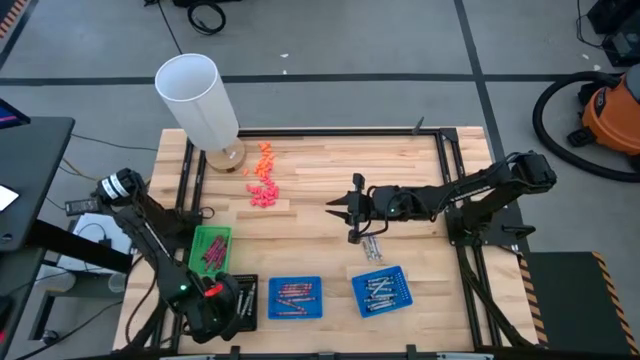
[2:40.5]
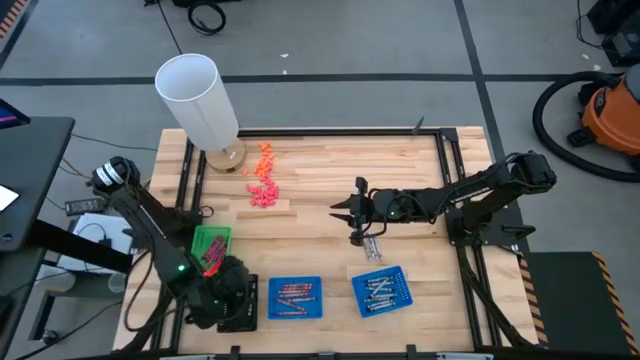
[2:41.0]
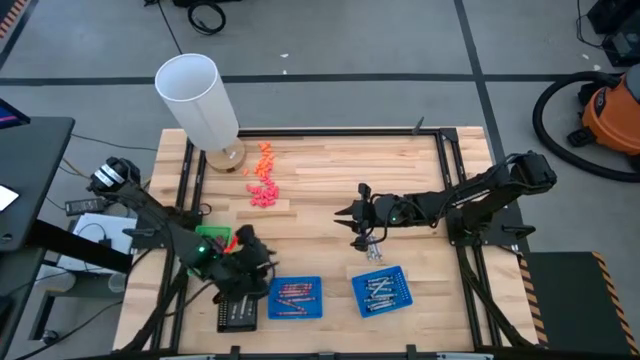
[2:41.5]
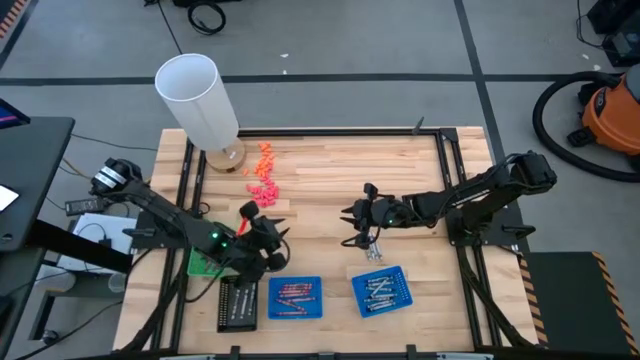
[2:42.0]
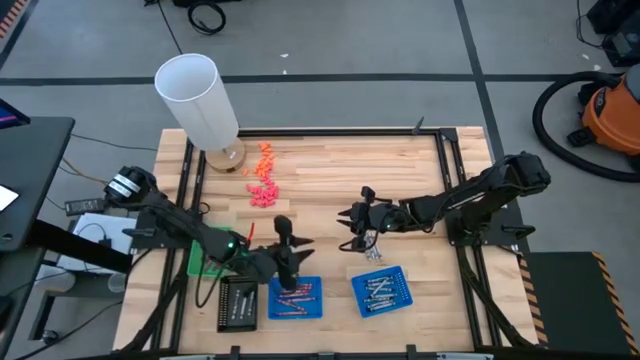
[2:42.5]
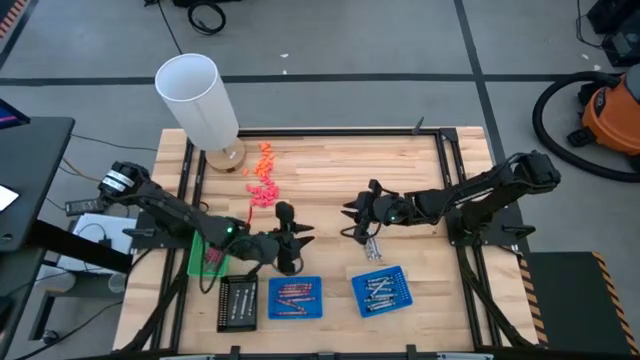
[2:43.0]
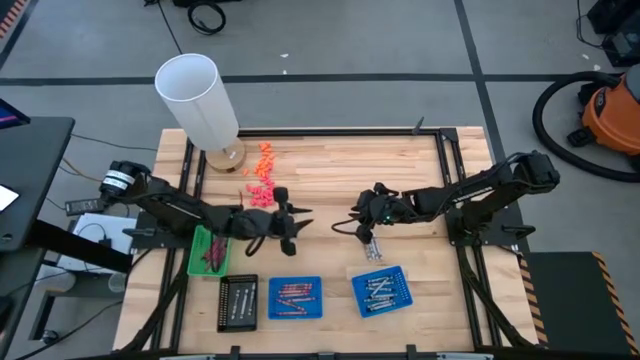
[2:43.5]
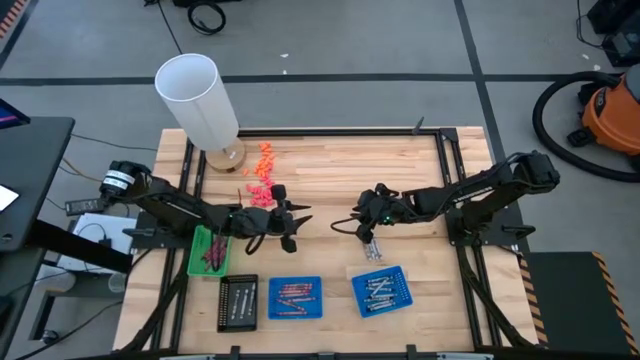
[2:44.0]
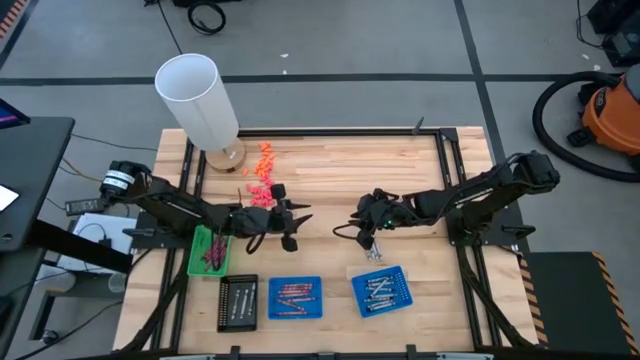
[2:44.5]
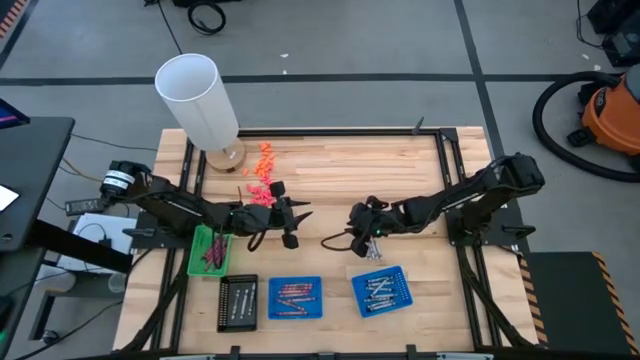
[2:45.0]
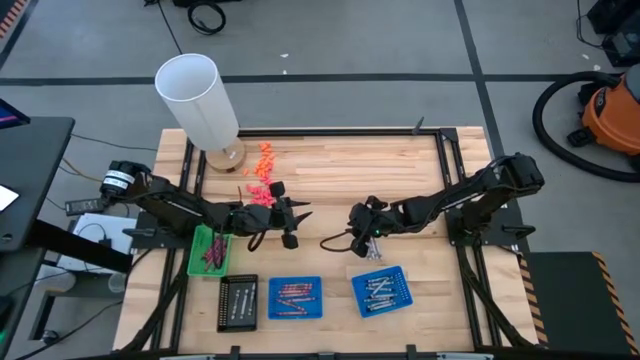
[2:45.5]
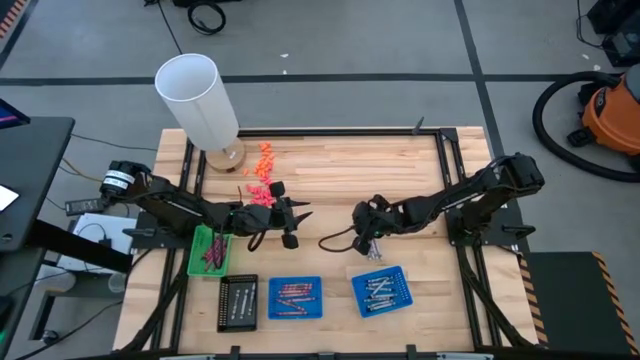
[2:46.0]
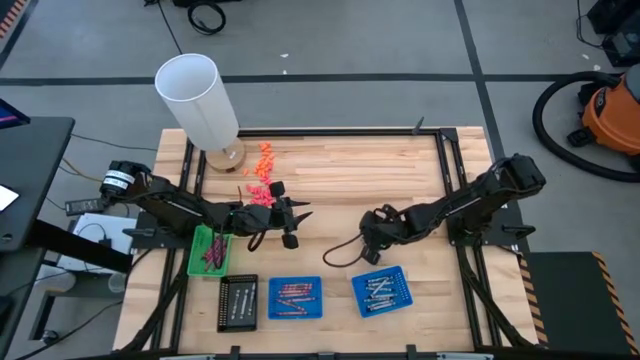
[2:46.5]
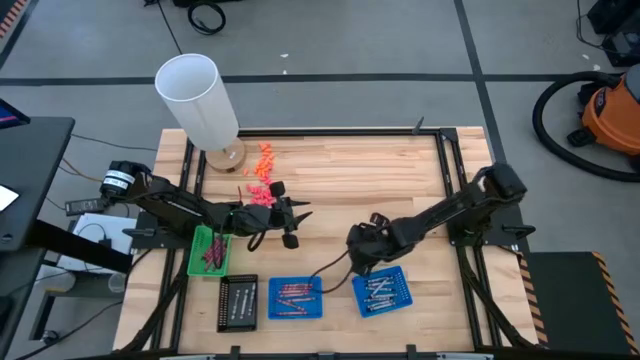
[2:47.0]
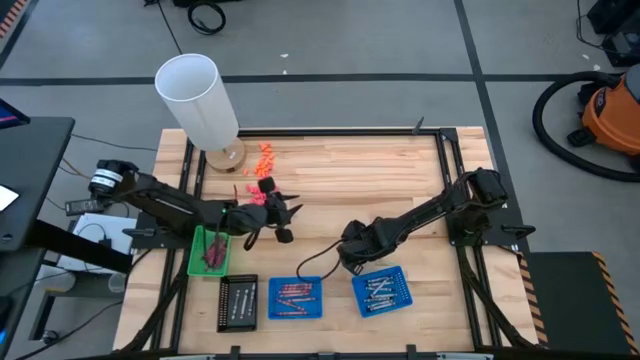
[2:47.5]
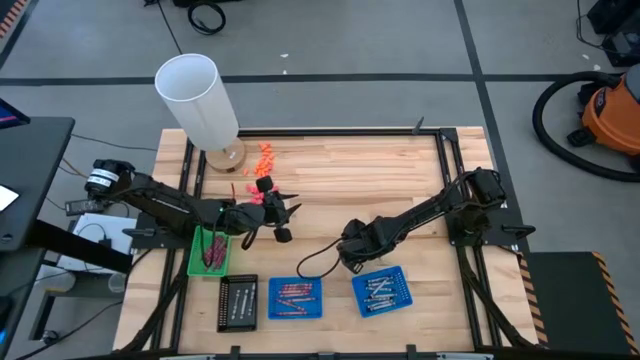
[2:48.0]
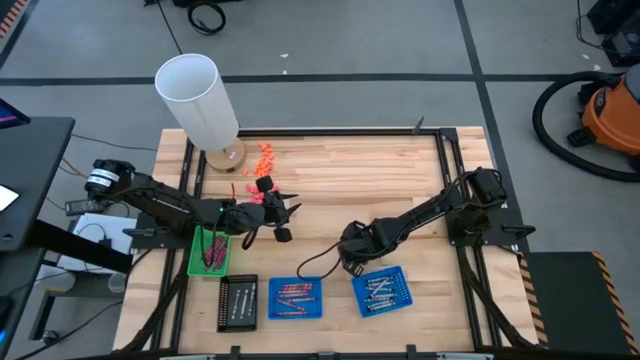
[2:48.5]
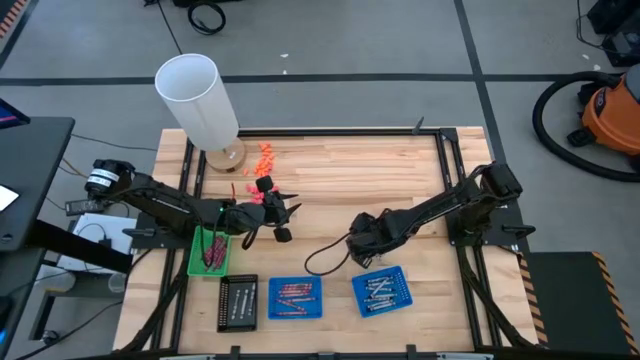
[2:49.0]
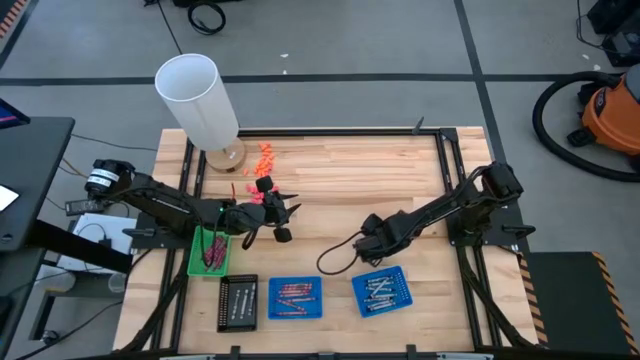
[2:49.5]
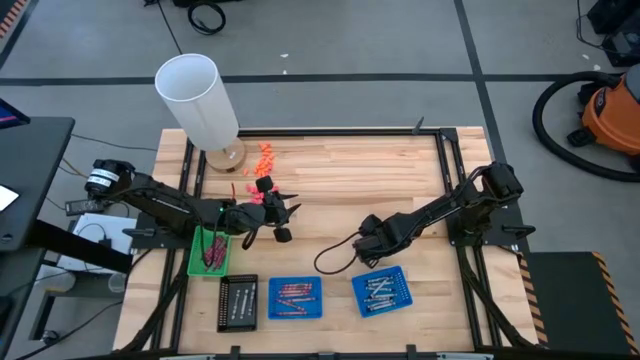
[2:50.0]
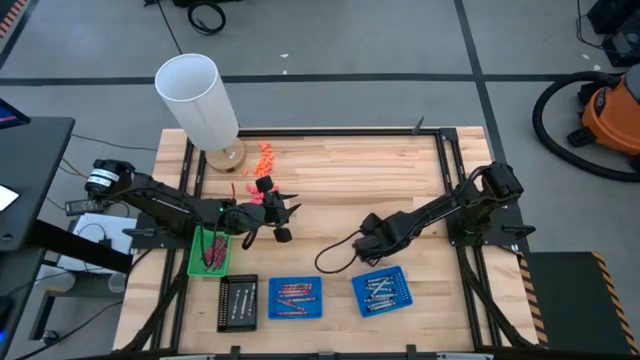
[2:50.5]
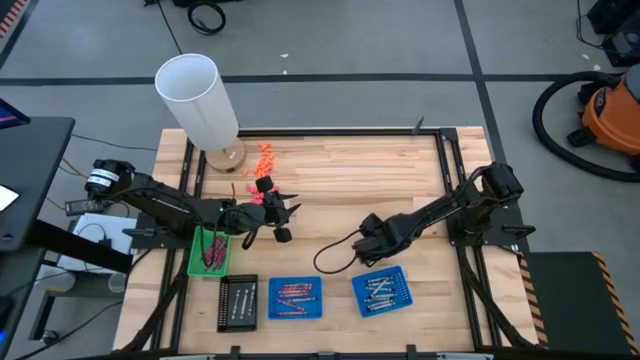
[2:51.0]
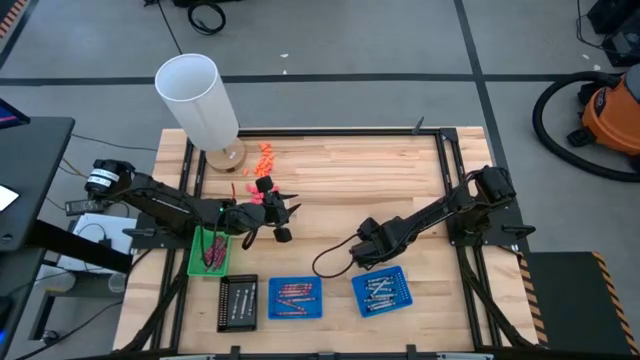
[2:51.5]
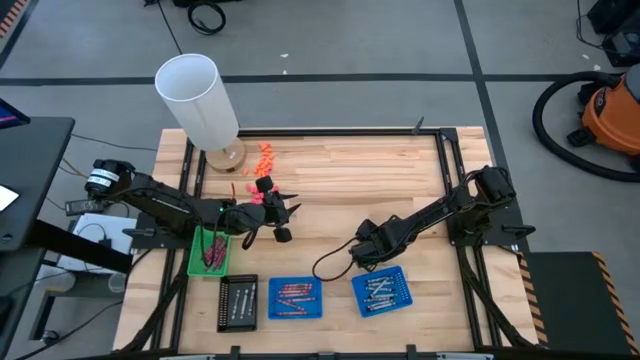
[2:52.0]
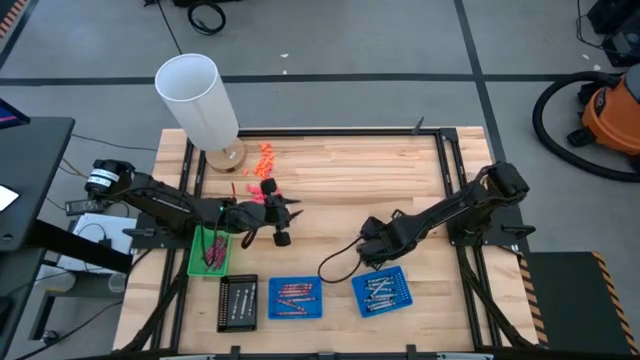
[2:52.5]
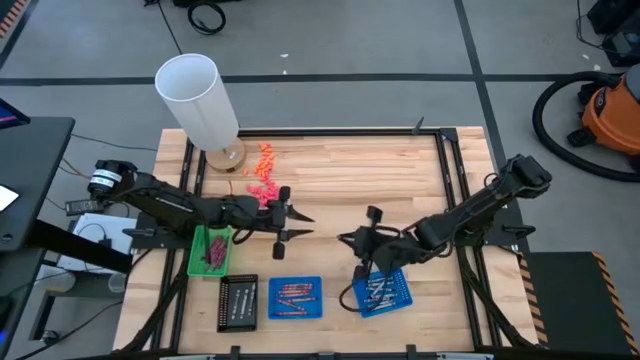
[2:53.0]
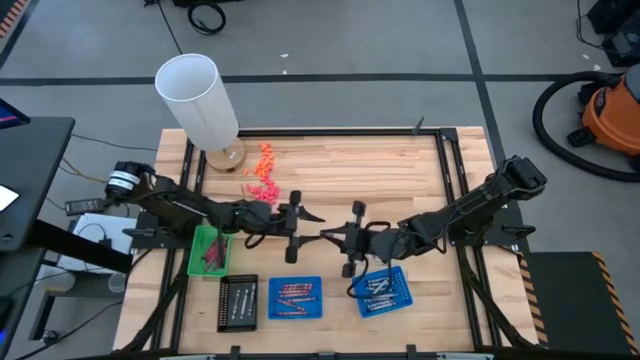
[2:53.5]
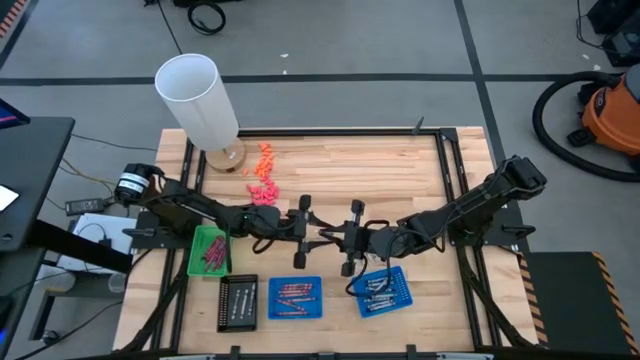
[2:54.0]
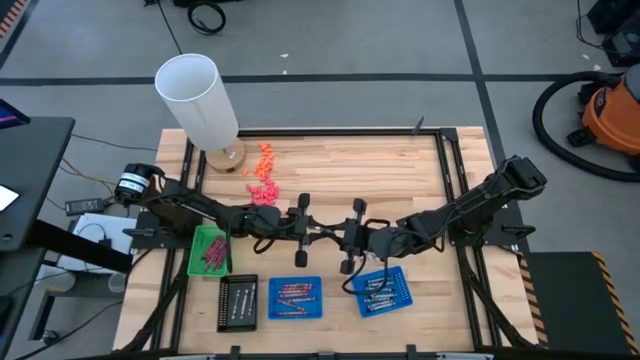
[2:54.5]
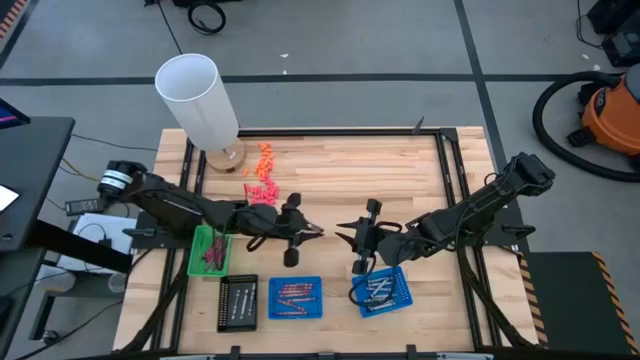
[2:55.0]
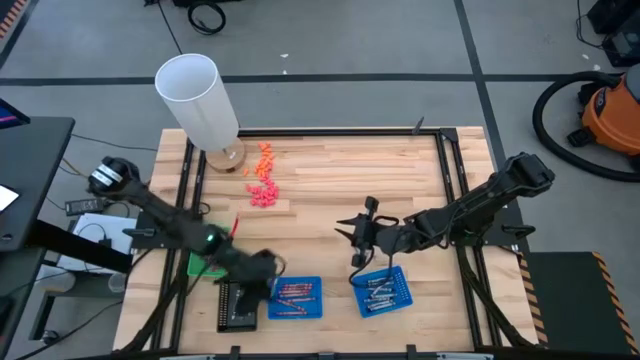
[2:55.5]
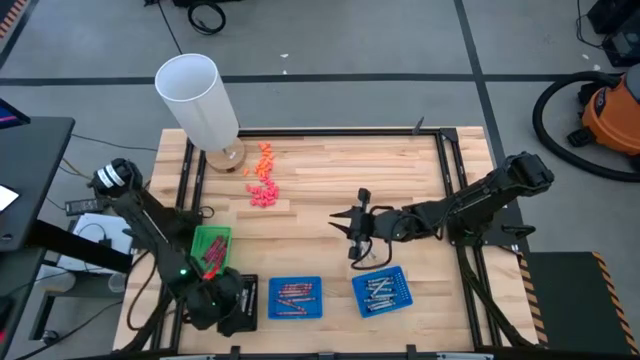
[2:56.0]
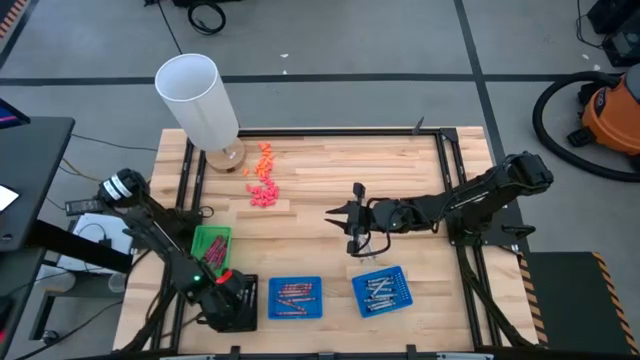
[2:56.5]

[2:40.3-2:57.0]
Task: Sort crayons
Put the white crayon into the black basket

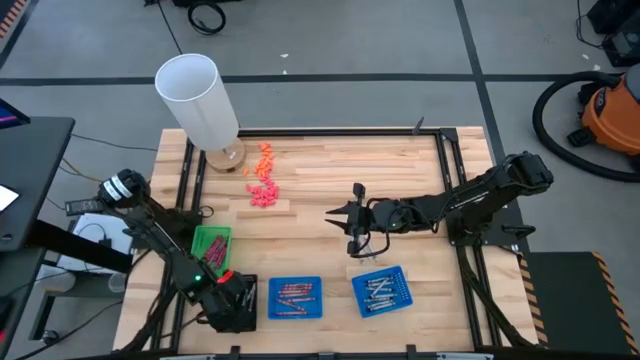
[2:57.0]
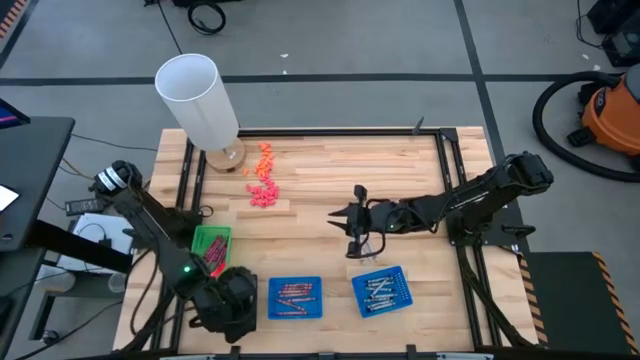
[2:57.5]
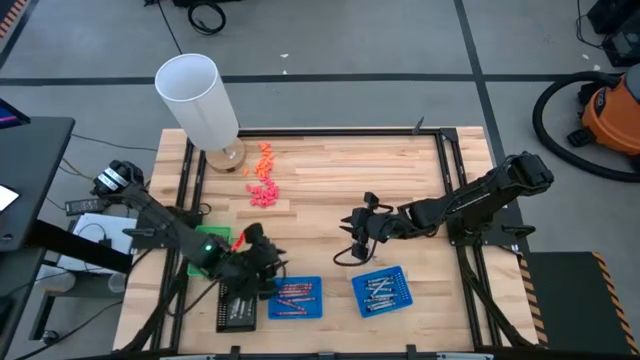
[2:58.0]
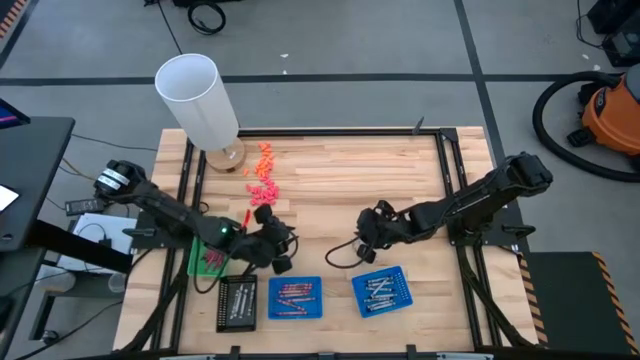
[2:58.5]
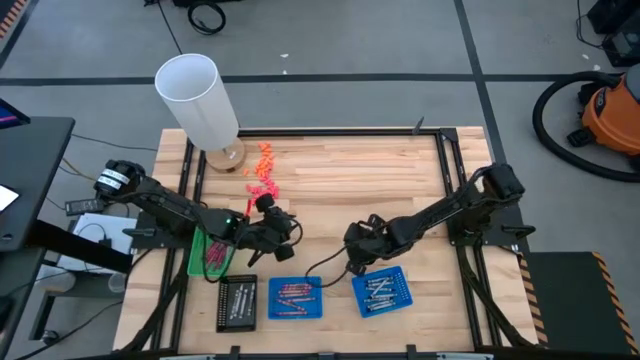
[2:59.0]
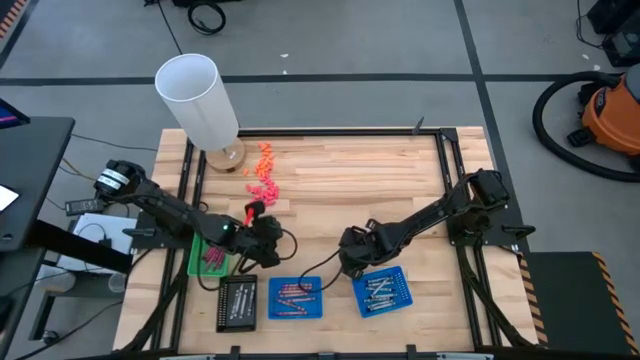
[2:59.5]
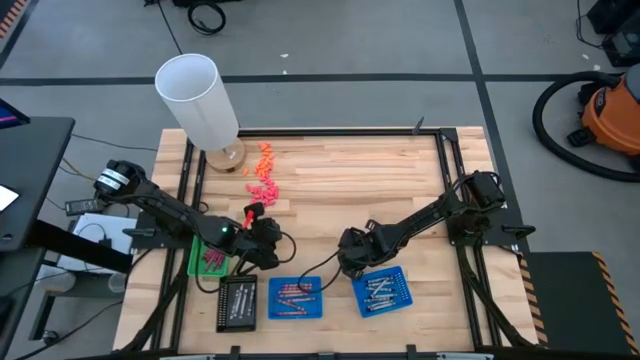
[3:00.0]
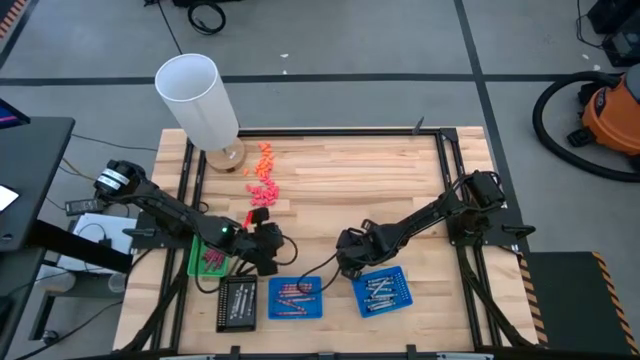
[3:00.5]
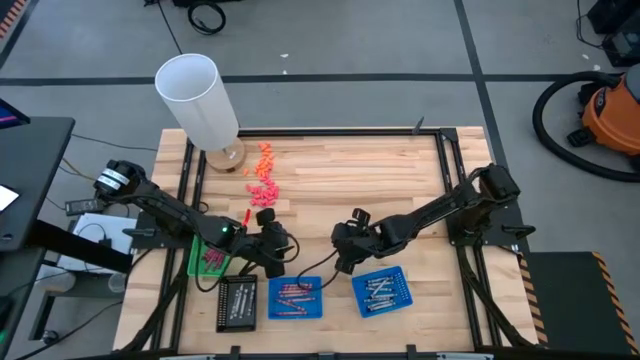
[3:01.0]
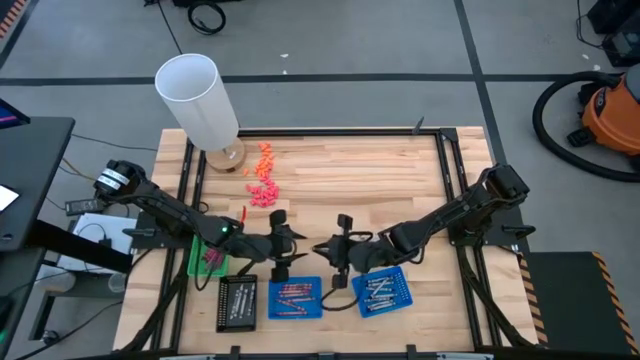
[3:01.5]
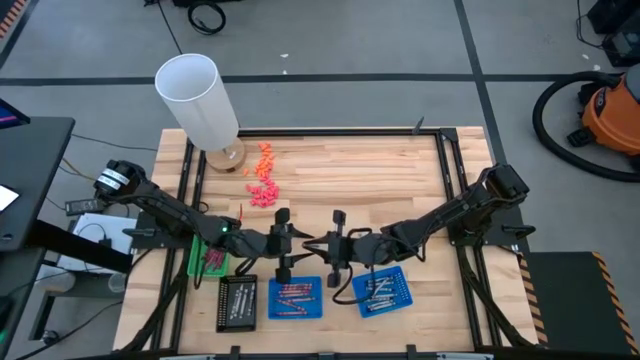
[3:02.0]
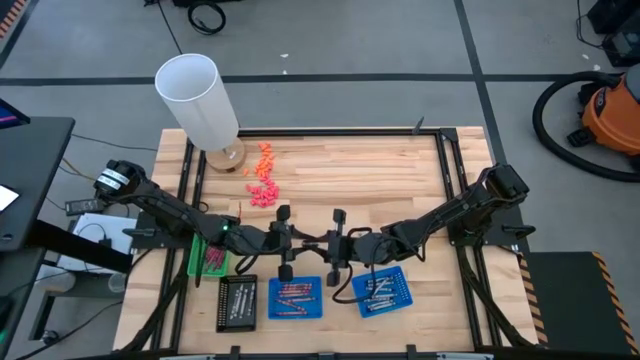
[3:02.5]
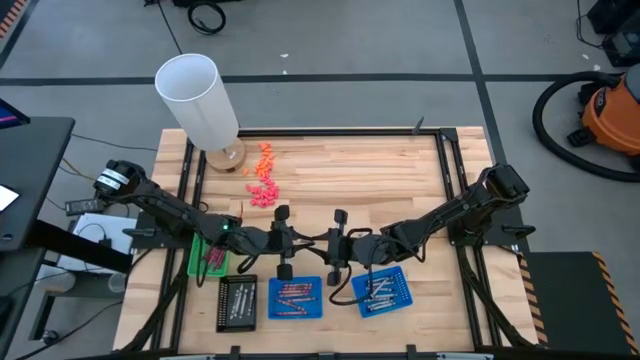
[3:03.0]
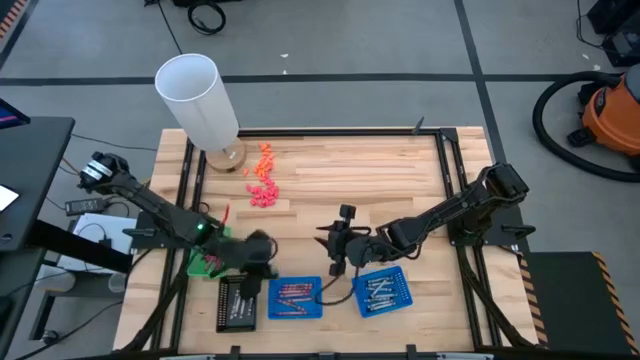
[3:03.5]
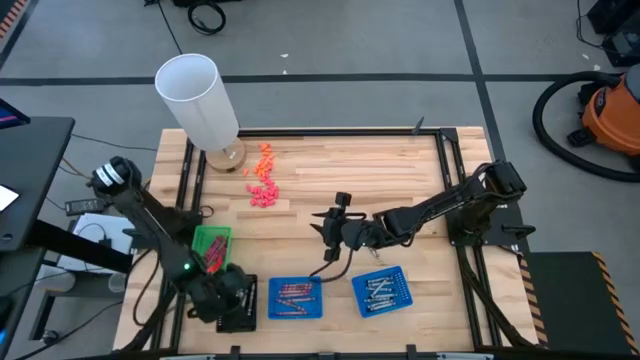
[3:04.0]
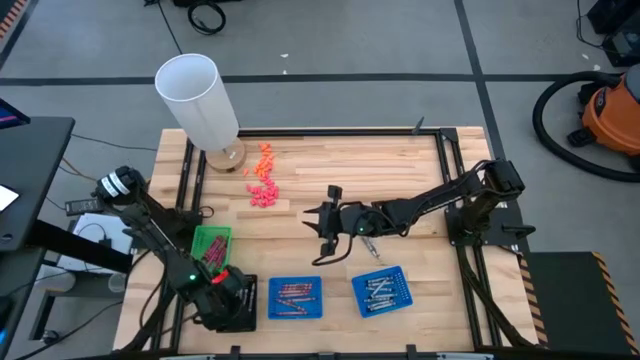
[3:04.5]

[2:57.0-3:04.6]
Put the white crayon into the black basket
